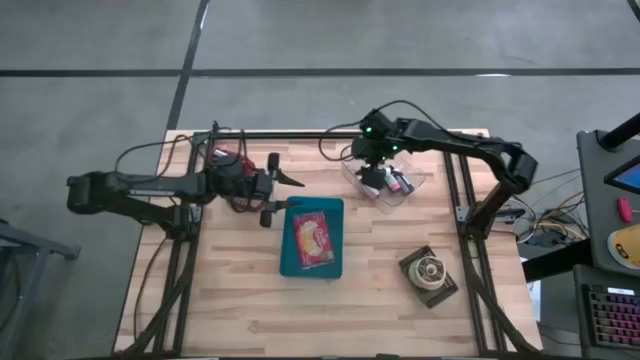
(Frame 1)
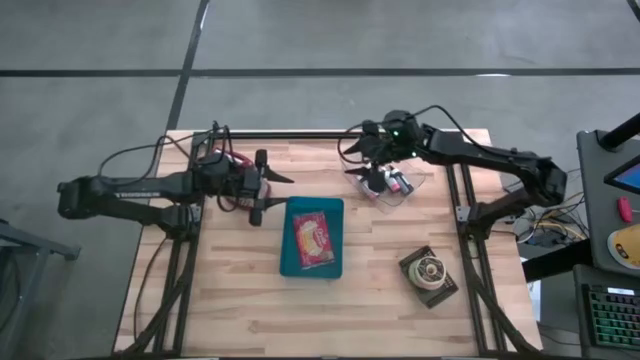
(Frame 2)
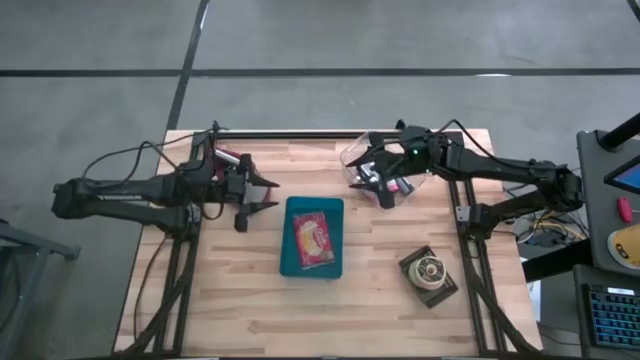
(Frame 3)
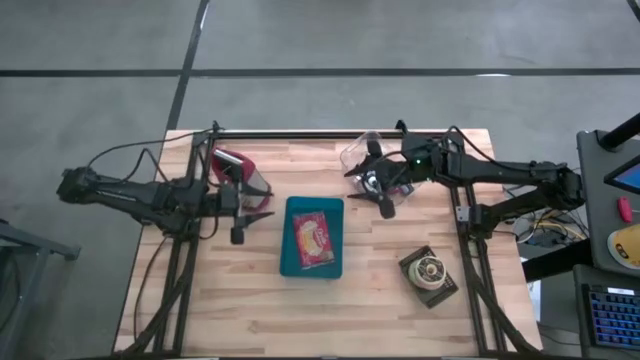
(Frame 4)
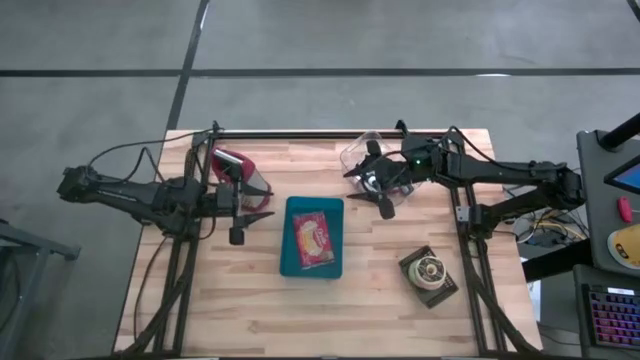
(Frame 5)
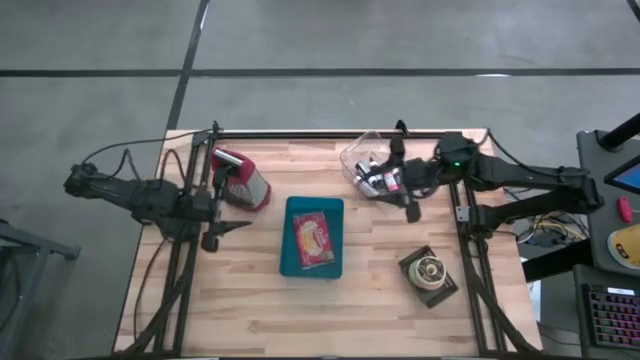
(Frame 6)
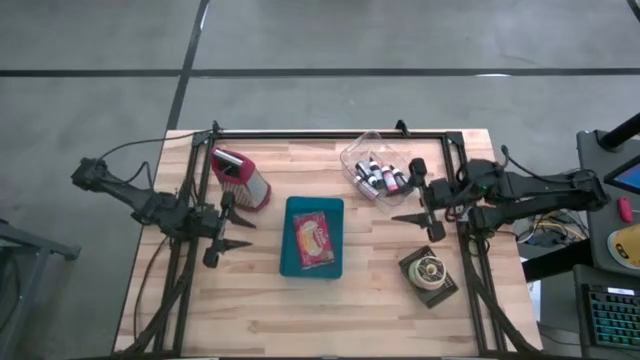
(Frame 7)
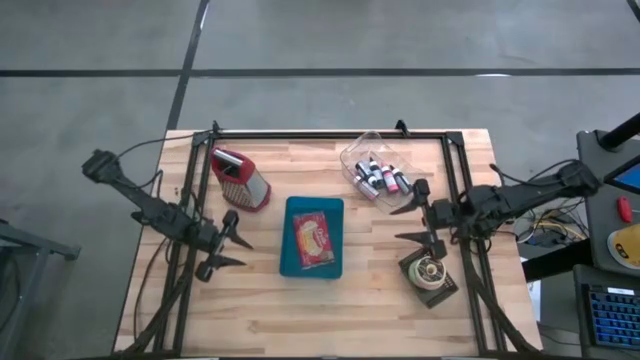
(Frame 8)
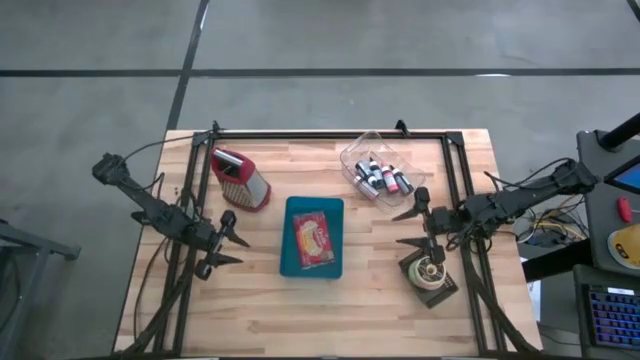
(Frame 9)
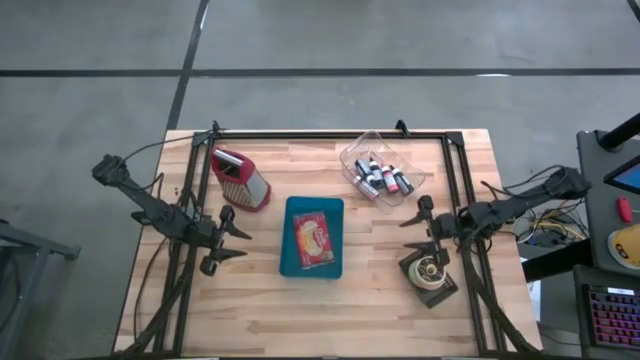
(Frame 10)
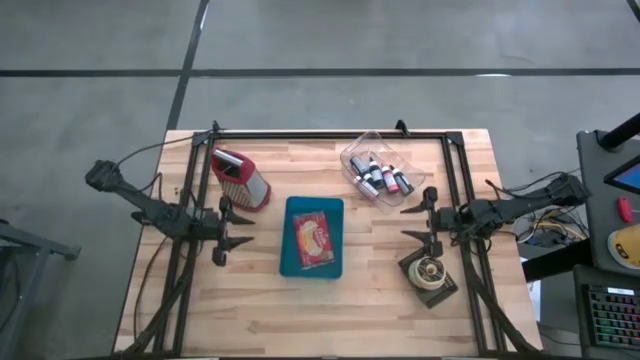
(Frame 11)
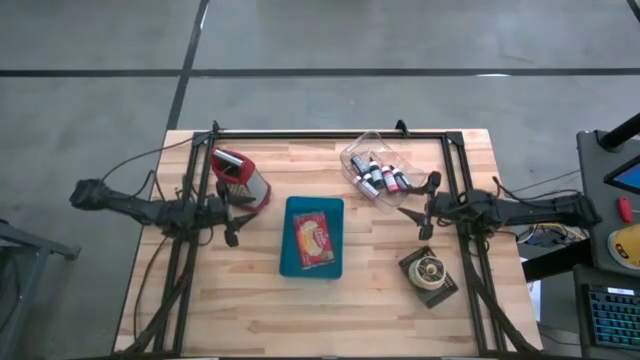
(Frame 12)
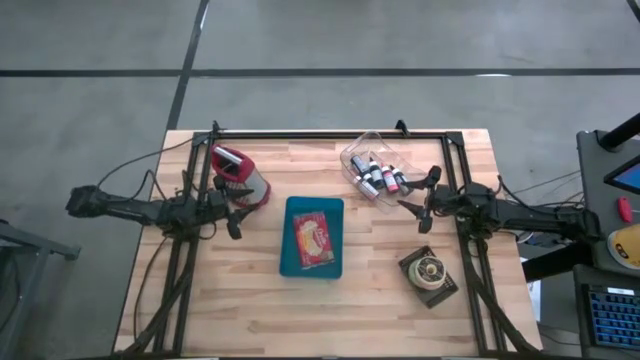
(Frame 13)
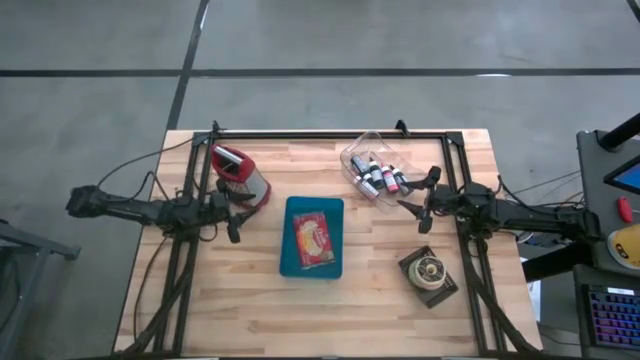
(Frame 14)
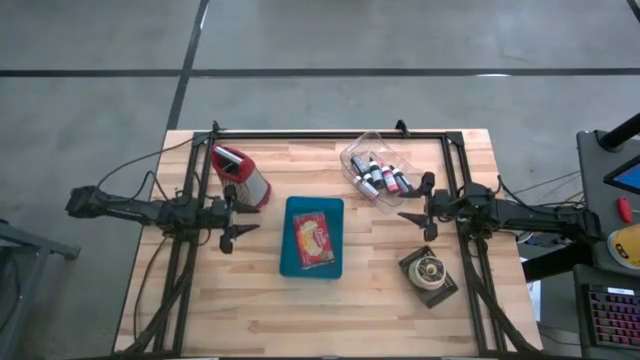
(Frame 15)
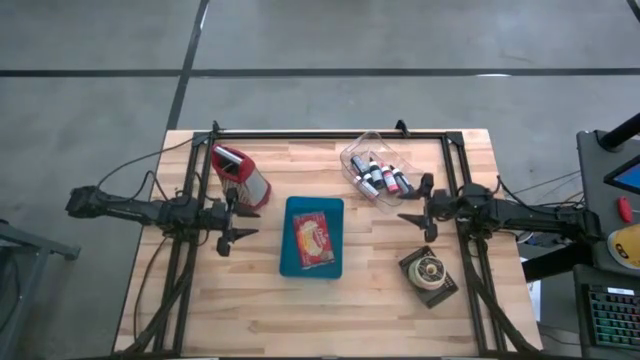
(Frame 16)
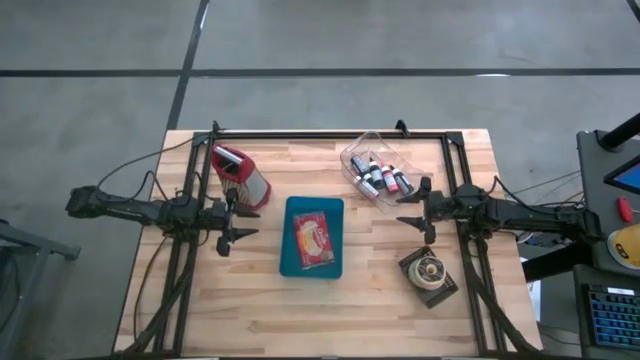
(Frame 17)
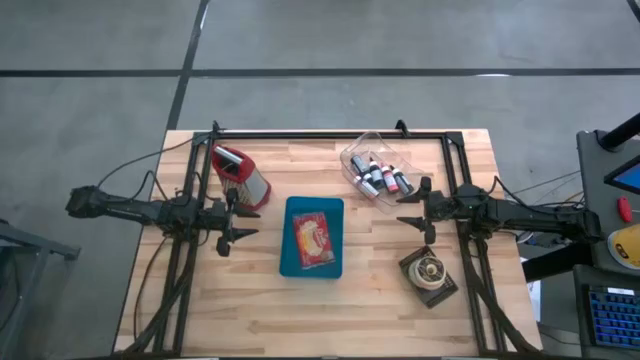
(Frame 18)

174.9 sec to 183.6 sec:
Task: Pick & Place Food Item
Return to Home Position

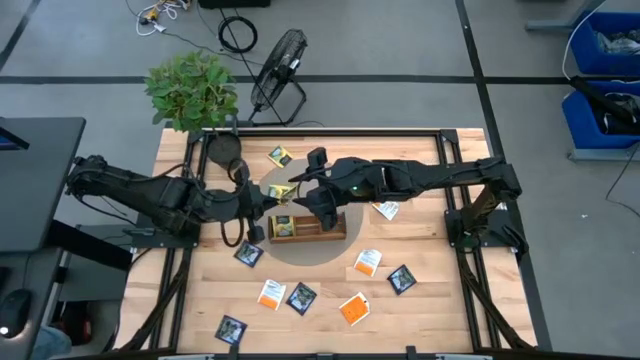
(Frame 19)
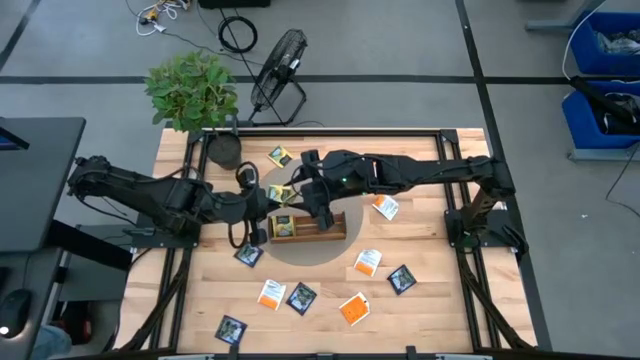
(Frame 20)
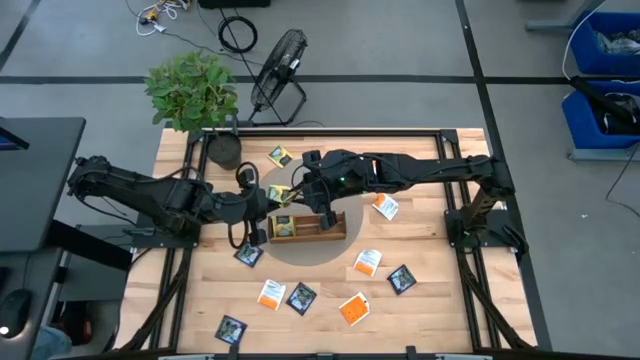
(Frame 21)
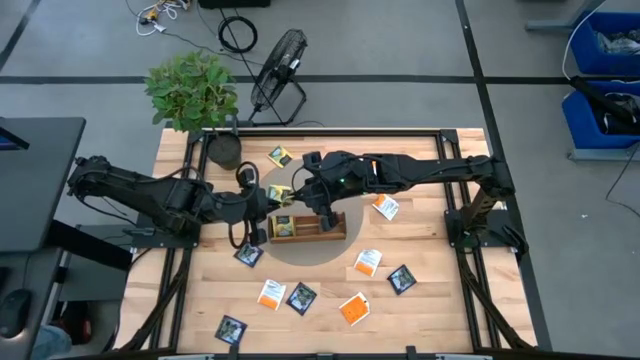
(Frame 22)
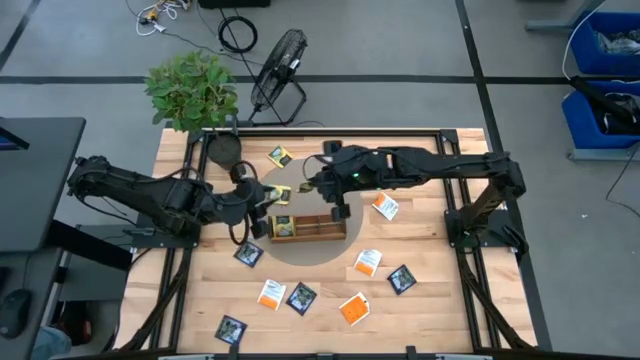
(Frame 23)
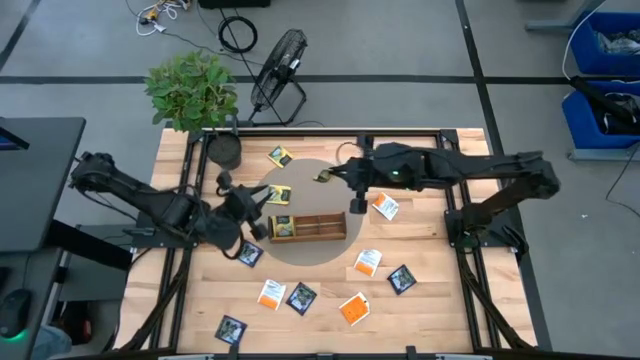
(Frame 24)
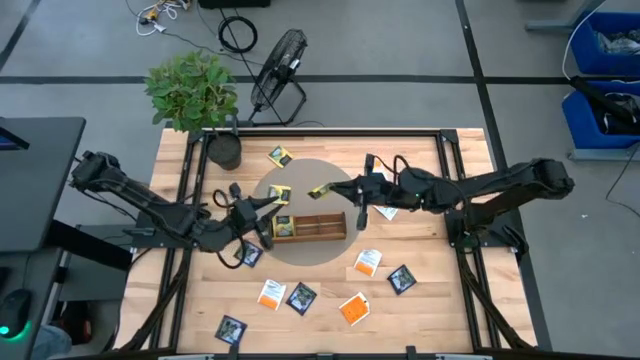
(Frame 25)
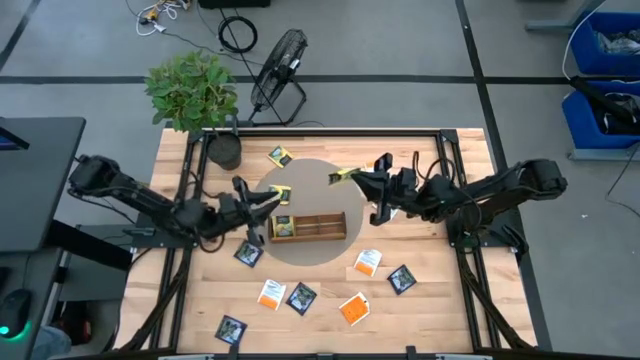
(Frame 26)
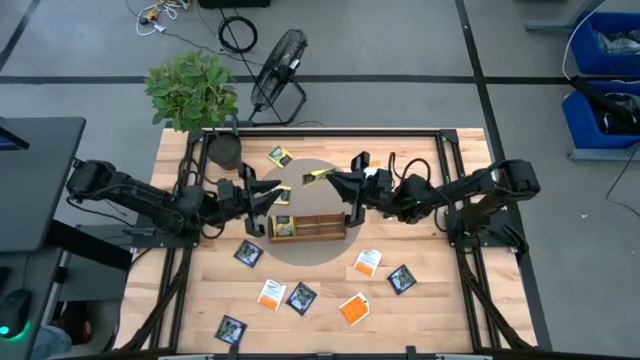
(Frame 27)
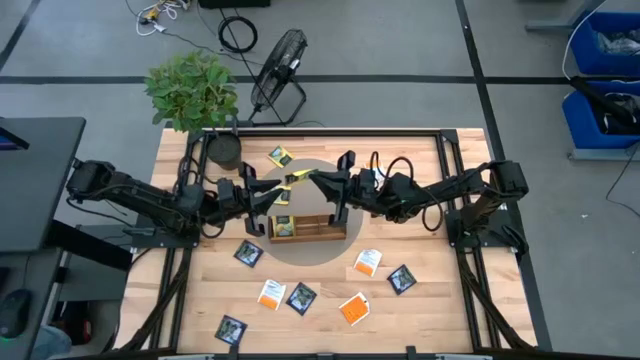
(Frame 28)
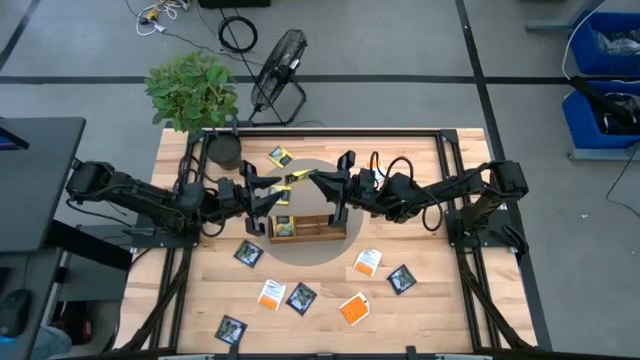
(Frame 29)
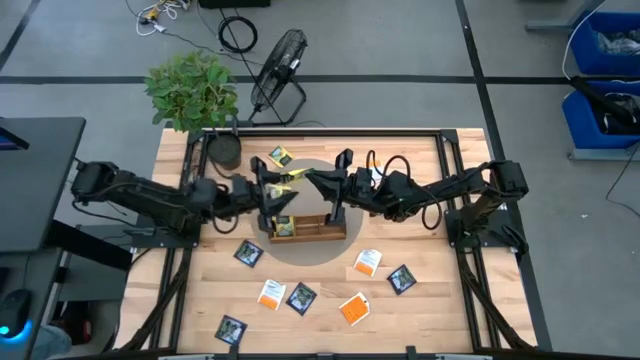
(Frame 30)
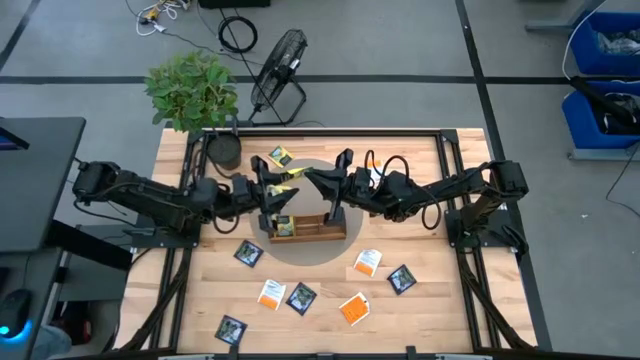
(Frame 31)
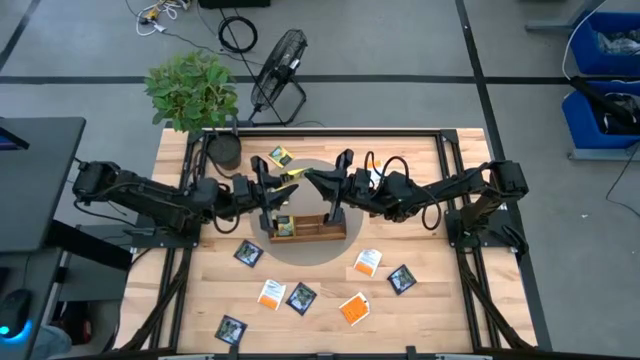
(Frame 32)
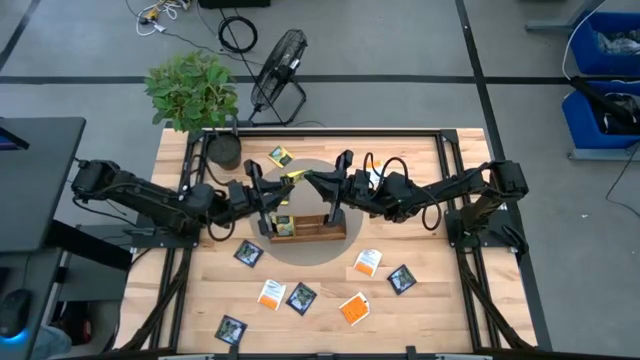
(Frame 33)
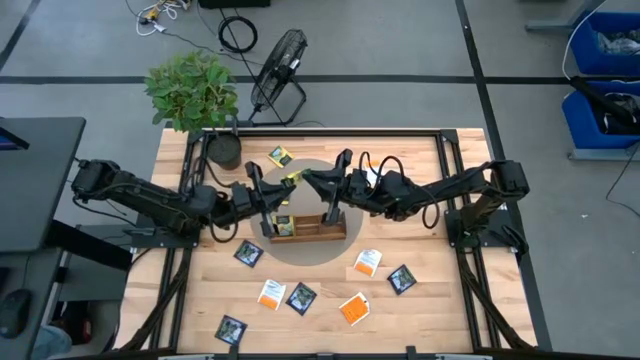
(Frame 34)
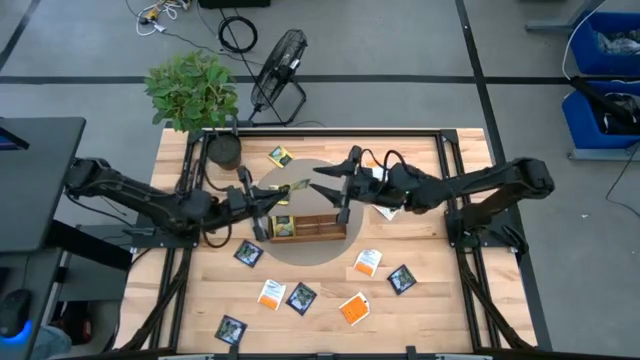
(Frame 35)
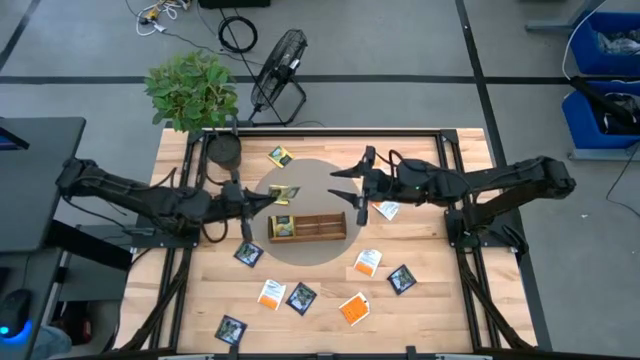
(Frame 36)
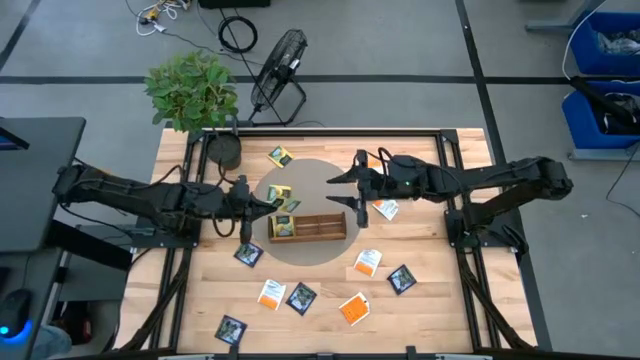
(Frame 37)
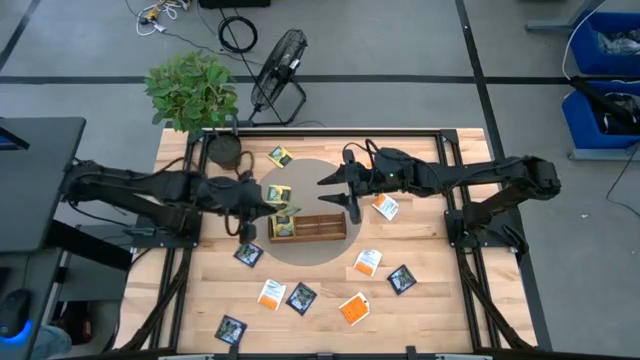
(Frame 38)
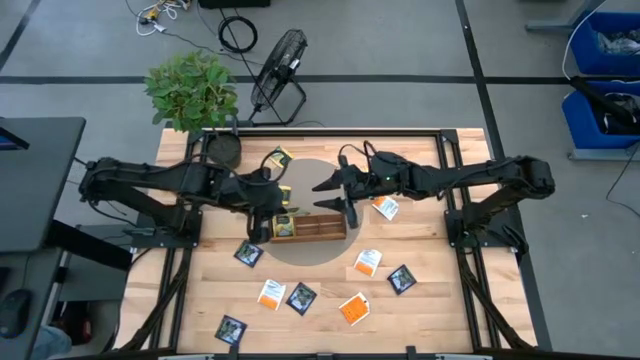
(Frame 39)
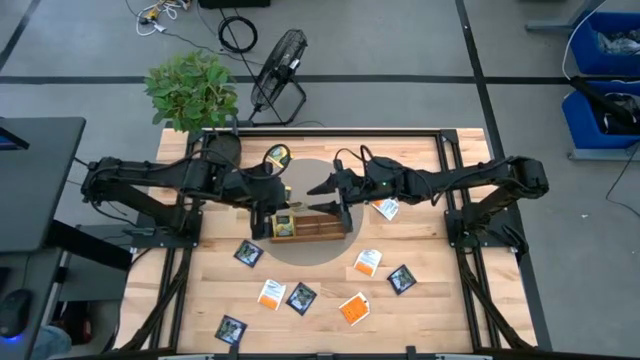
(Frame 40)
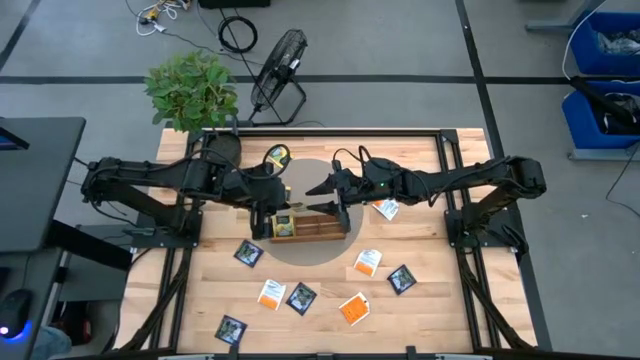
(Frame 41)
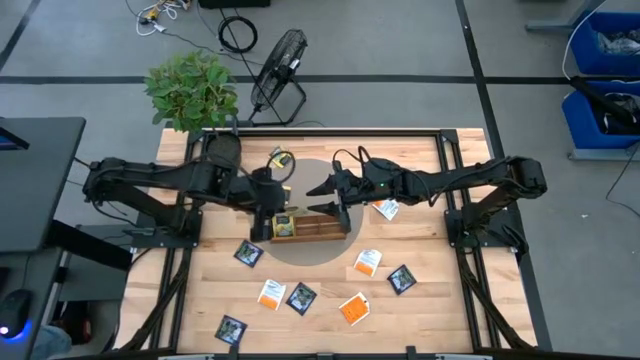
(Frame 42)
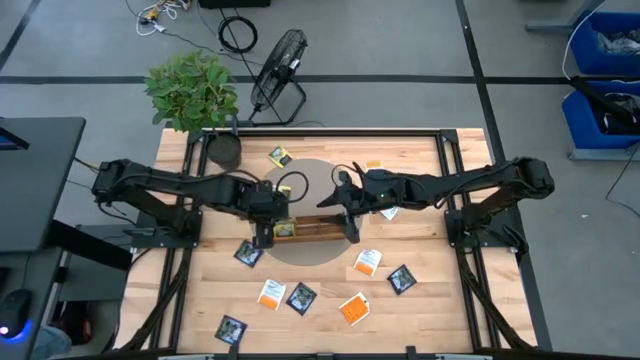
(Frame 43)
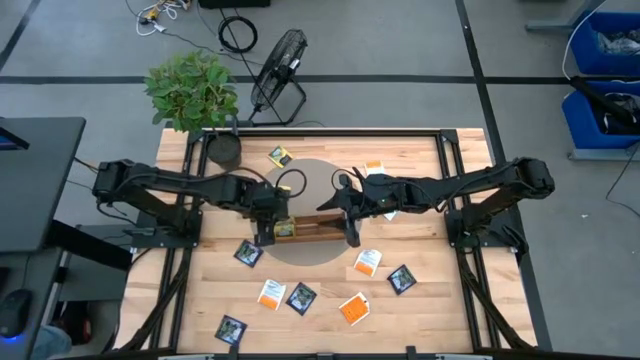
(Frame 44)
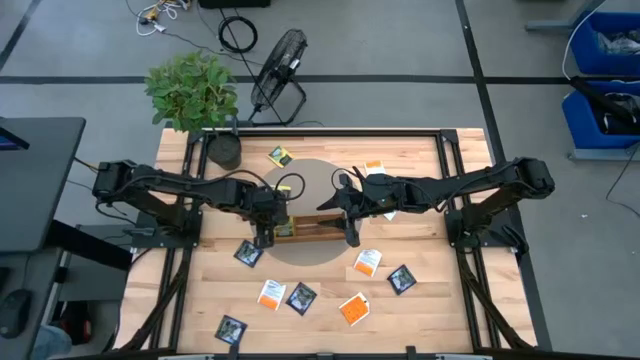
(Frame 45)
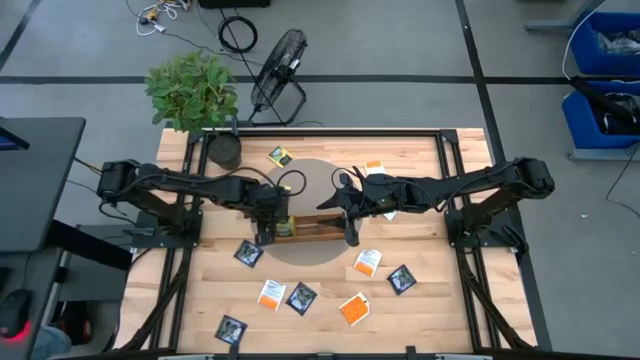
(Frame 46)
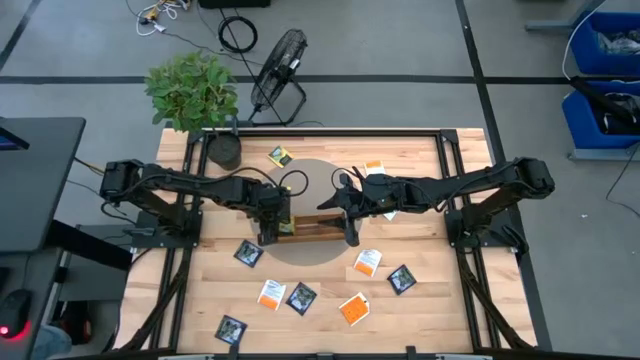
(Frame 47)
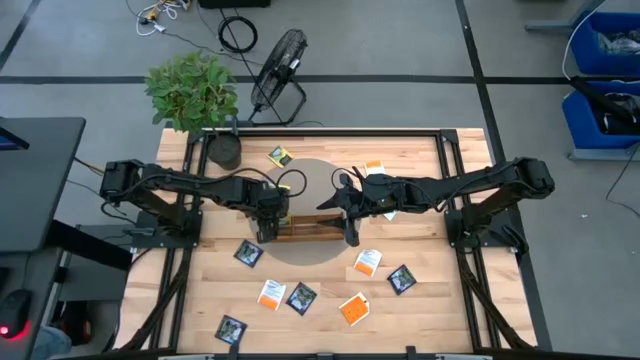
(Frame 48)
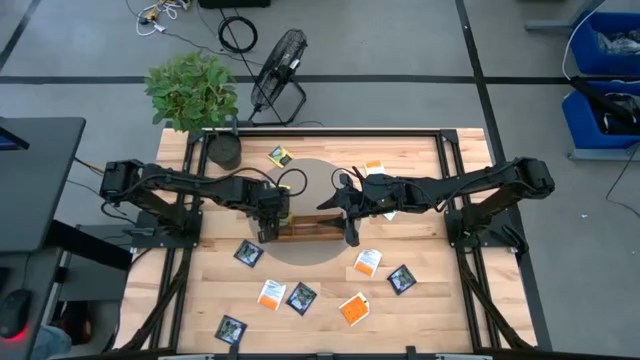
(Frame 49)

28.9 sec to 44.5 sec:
Task: Pick & Place Tea
Put the right yellow tea bag into the left section of the wooden organizer
